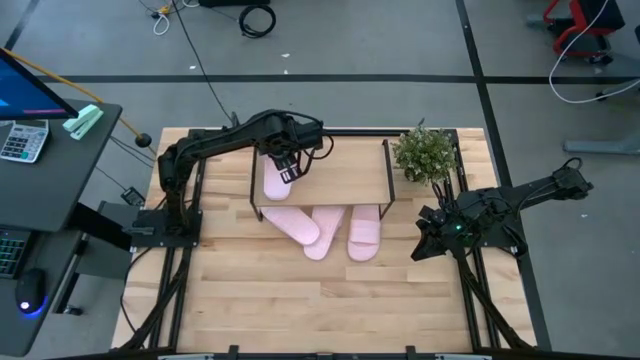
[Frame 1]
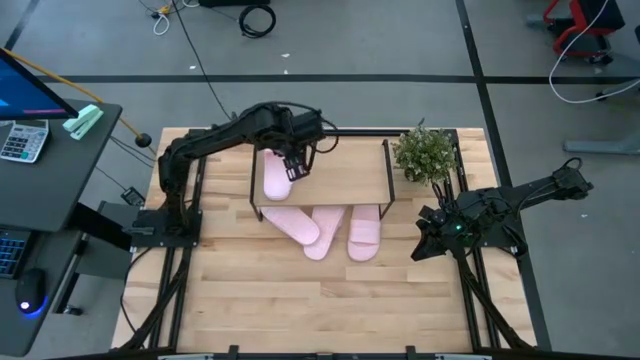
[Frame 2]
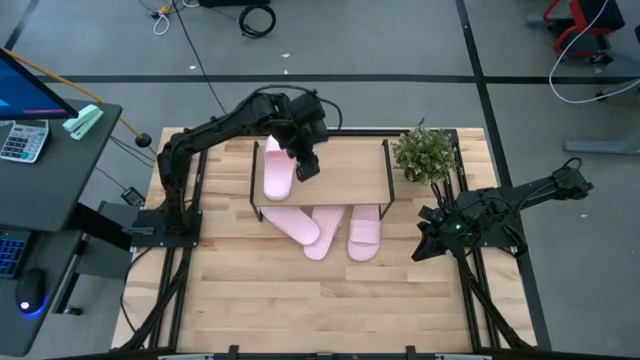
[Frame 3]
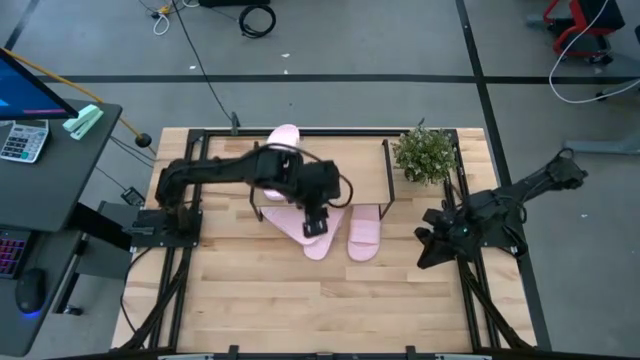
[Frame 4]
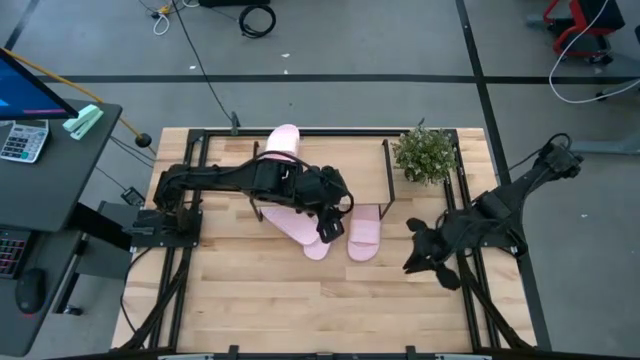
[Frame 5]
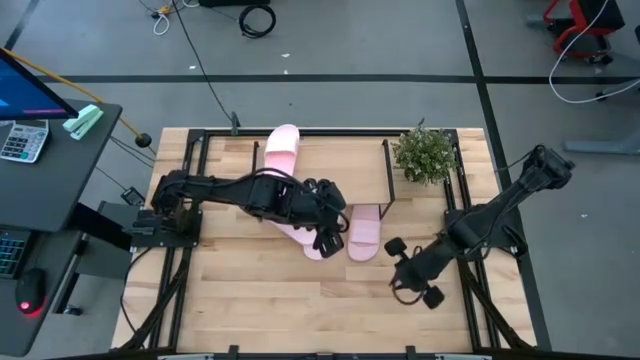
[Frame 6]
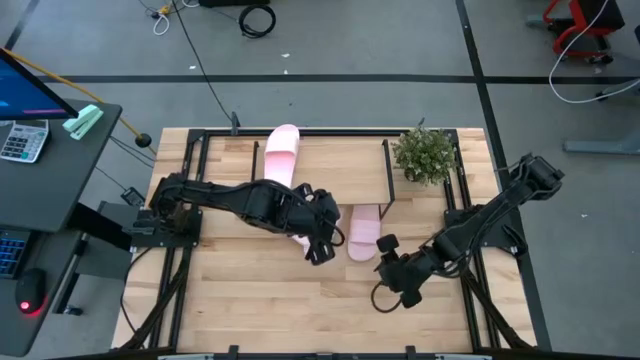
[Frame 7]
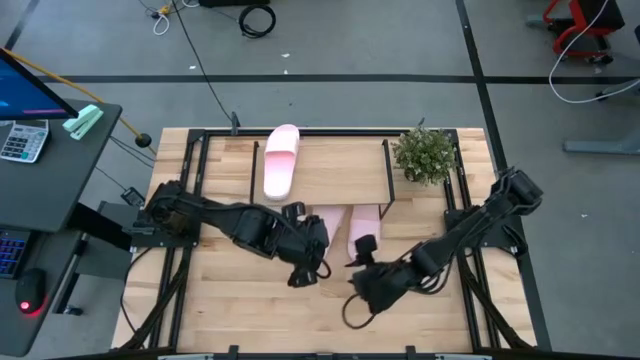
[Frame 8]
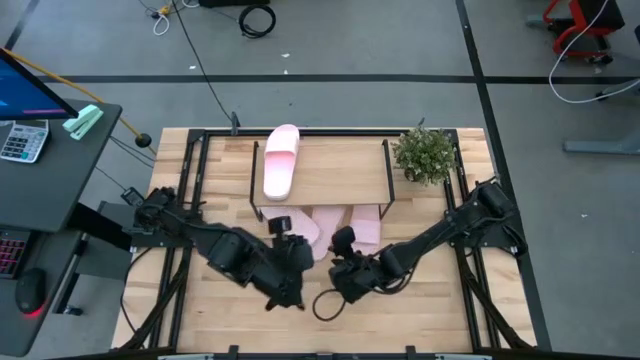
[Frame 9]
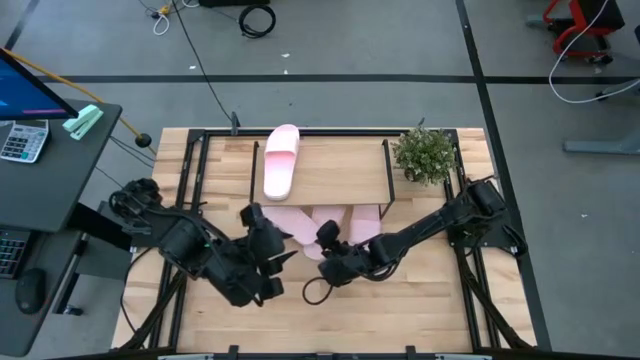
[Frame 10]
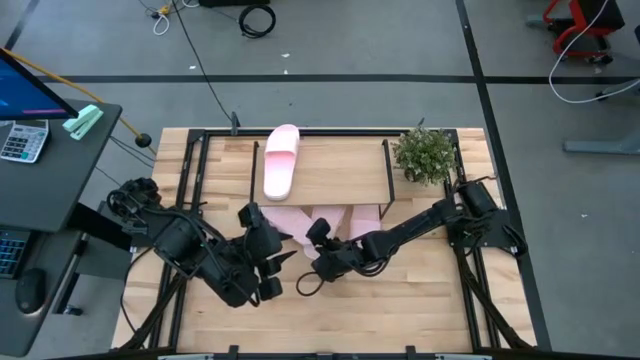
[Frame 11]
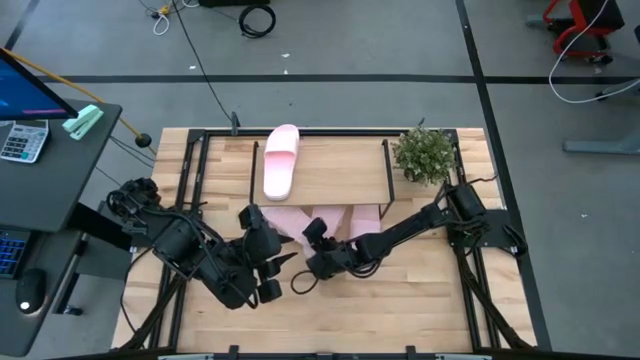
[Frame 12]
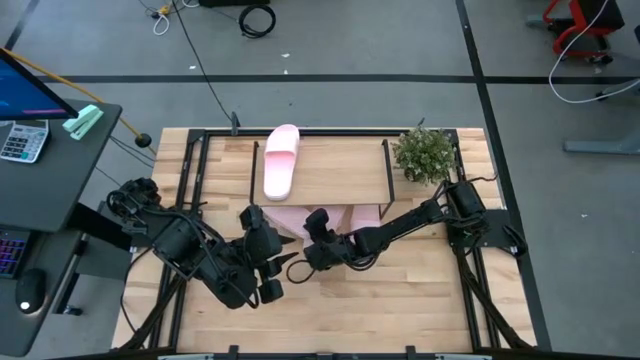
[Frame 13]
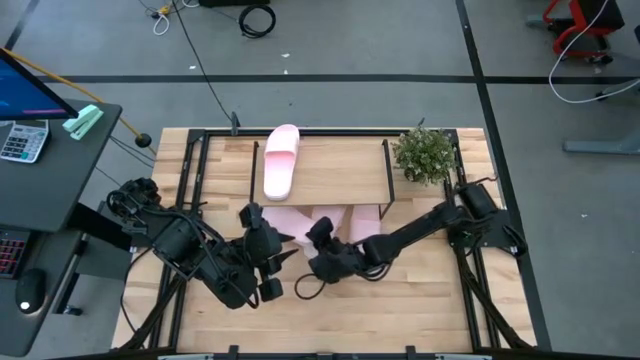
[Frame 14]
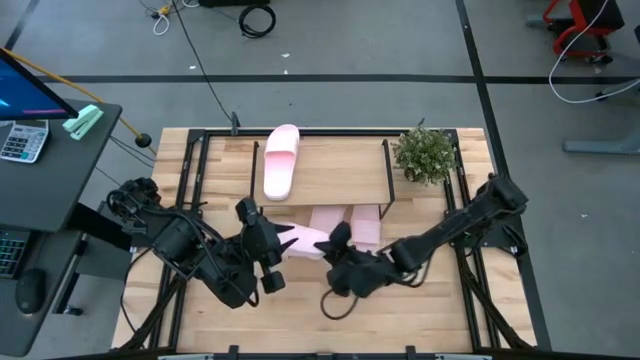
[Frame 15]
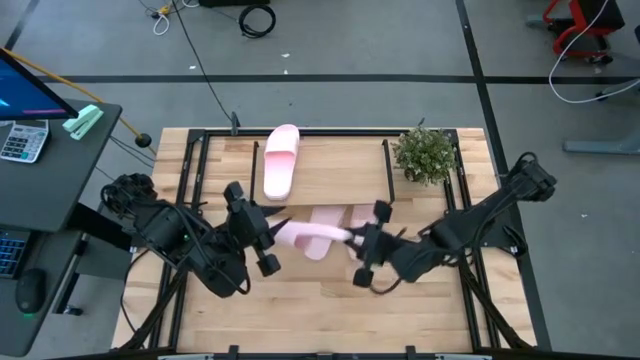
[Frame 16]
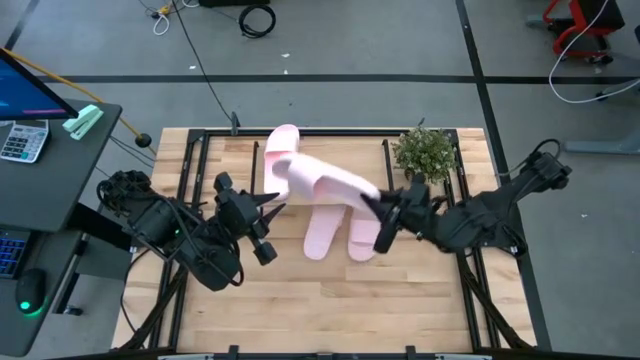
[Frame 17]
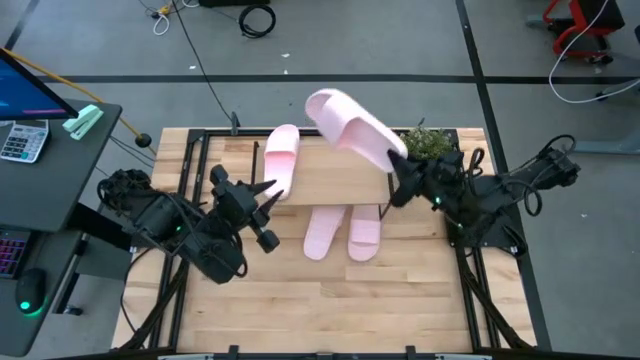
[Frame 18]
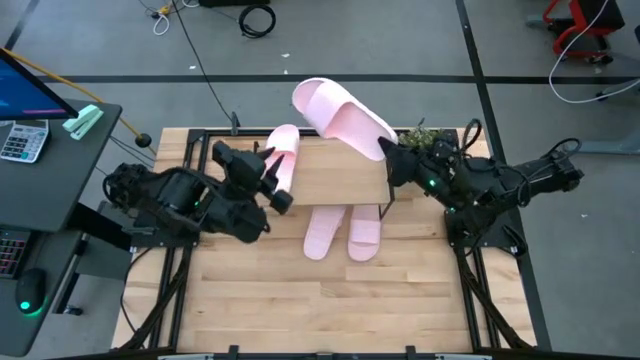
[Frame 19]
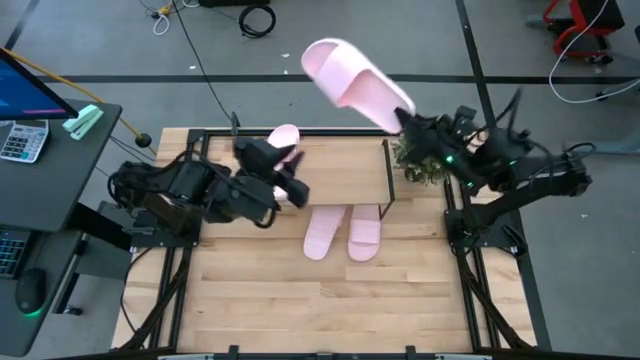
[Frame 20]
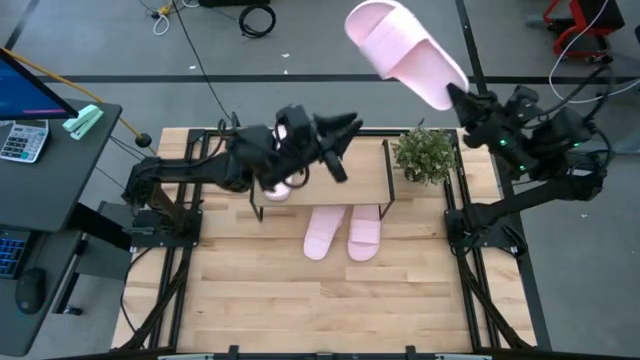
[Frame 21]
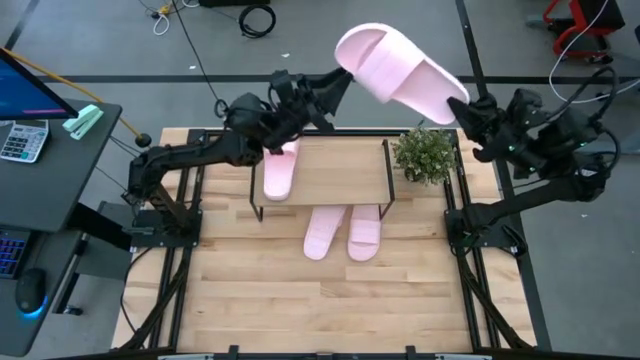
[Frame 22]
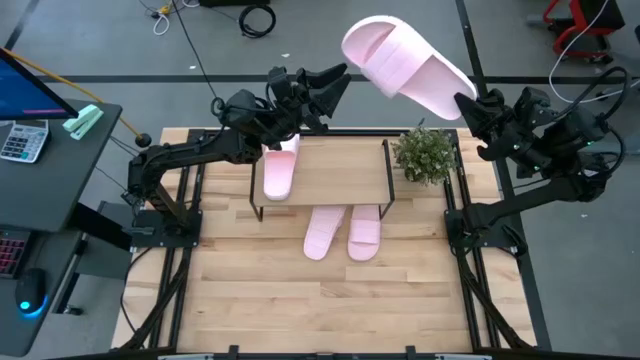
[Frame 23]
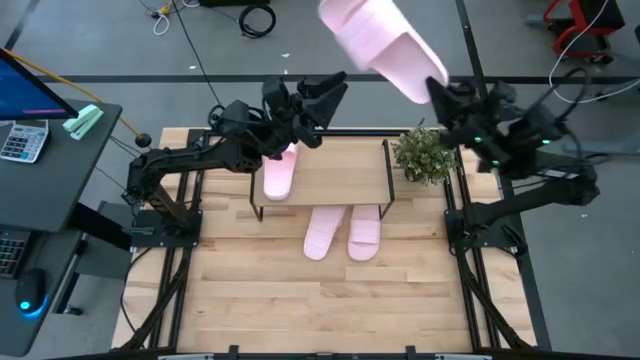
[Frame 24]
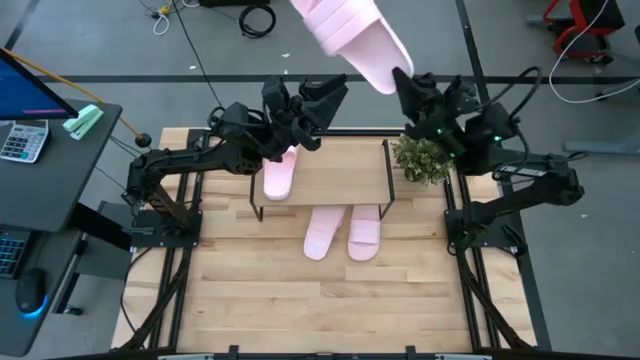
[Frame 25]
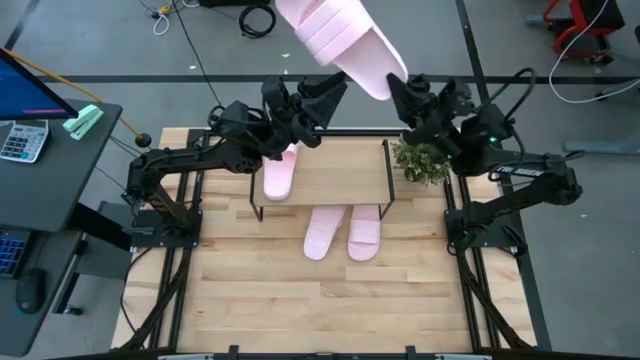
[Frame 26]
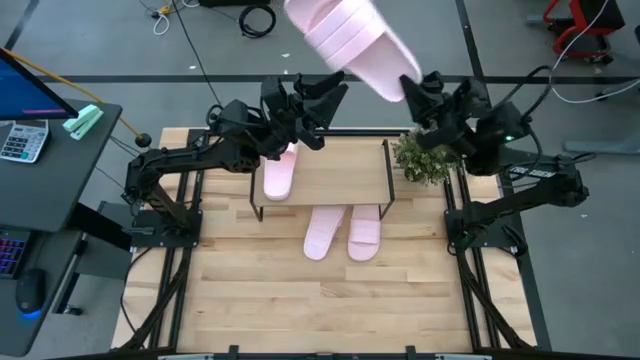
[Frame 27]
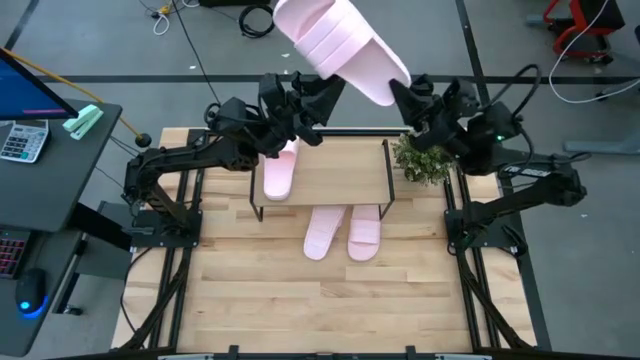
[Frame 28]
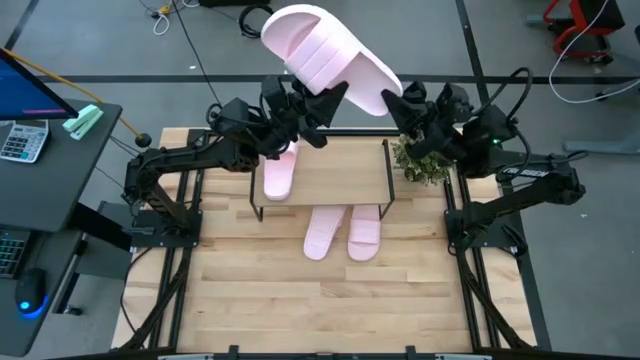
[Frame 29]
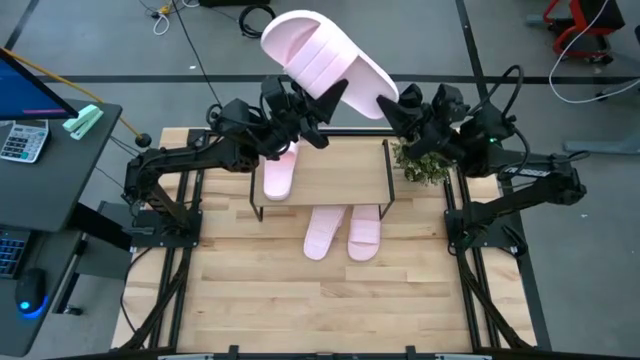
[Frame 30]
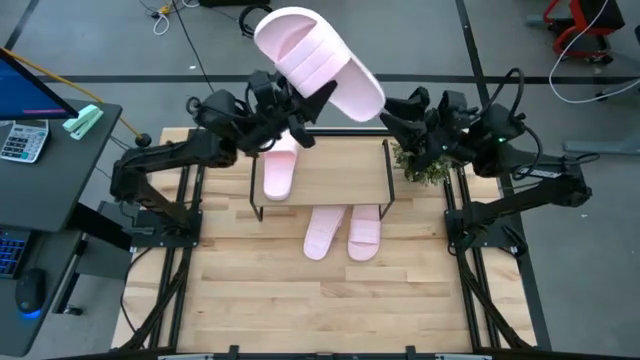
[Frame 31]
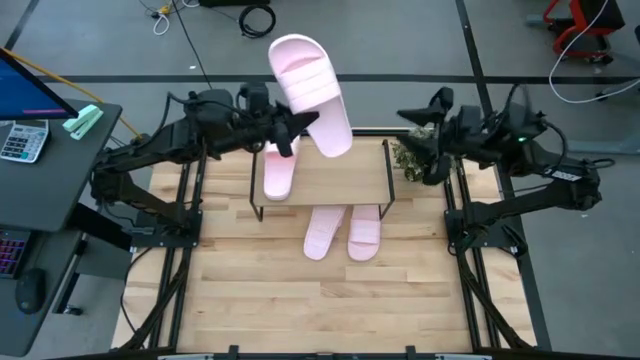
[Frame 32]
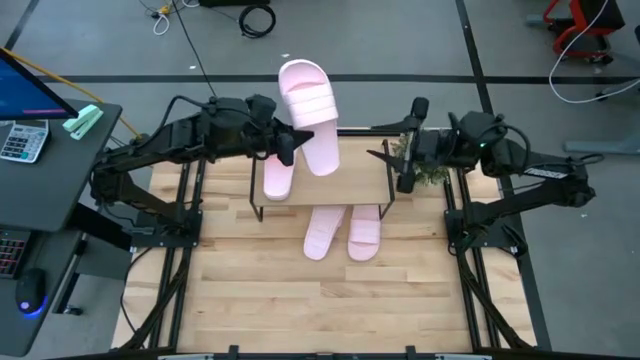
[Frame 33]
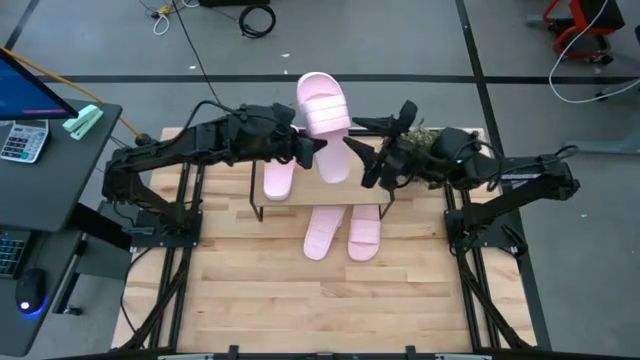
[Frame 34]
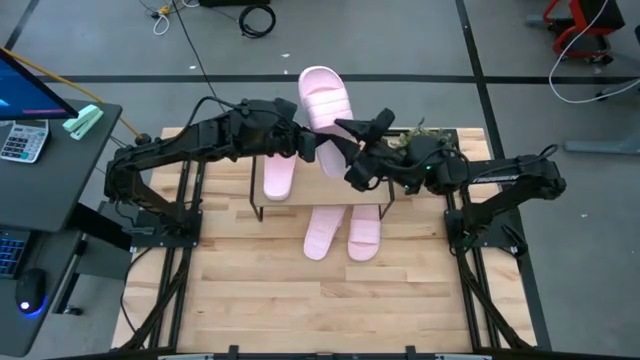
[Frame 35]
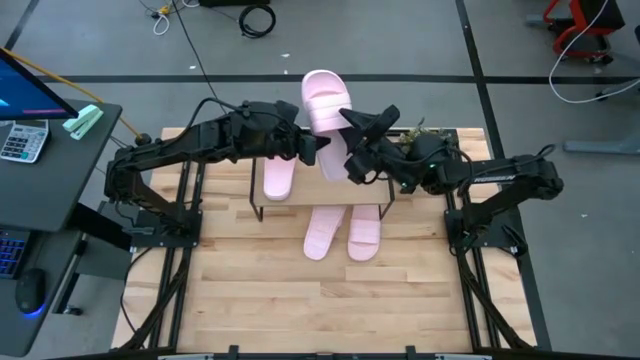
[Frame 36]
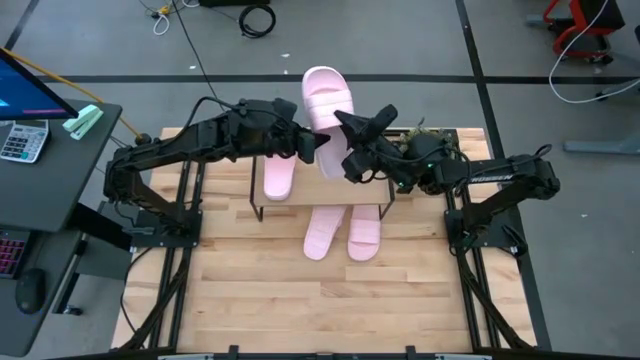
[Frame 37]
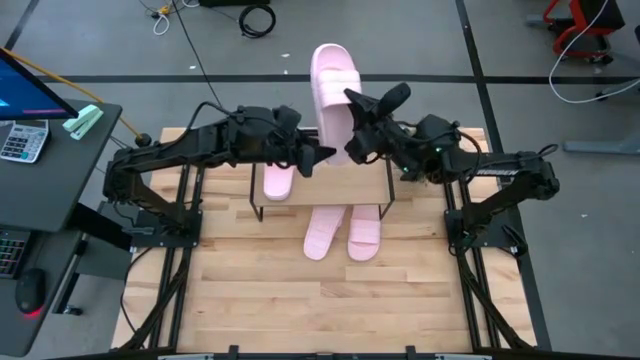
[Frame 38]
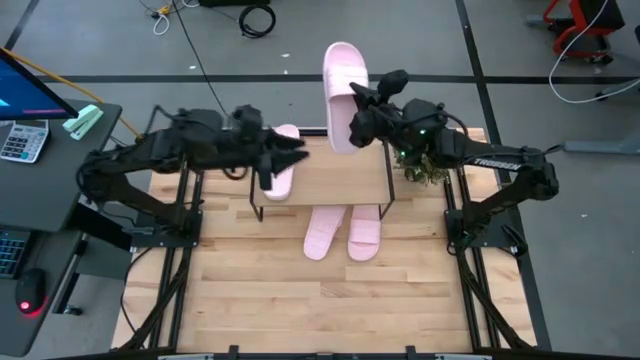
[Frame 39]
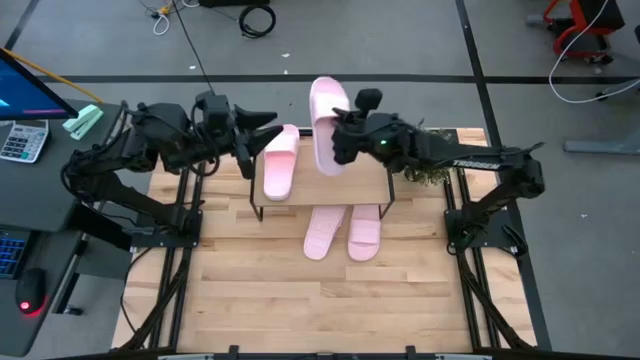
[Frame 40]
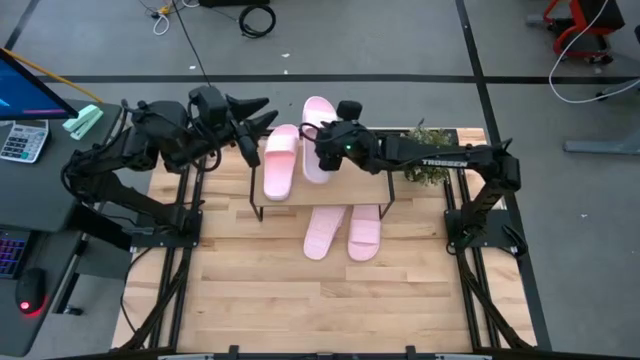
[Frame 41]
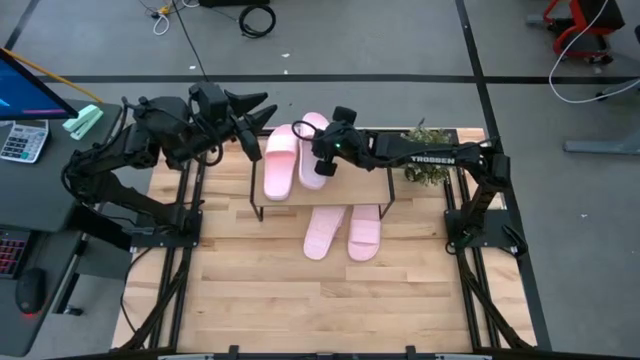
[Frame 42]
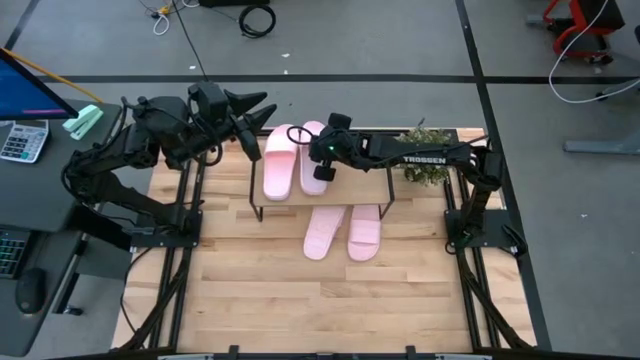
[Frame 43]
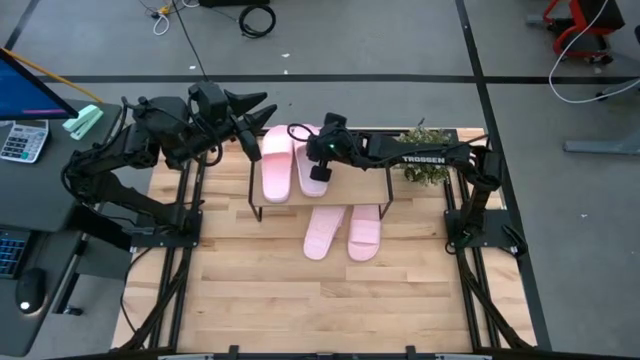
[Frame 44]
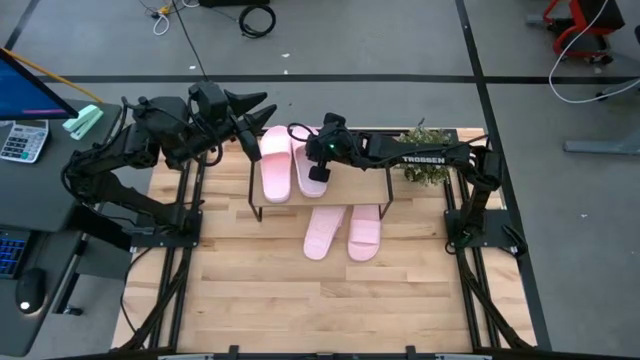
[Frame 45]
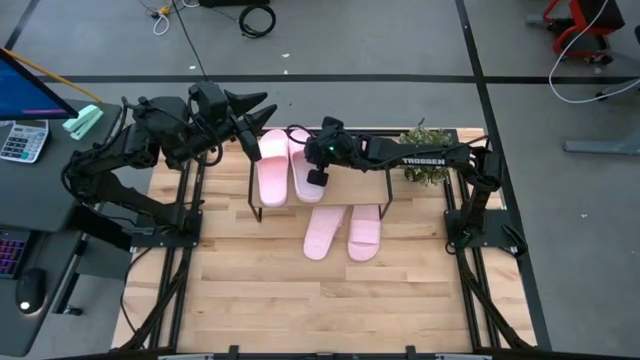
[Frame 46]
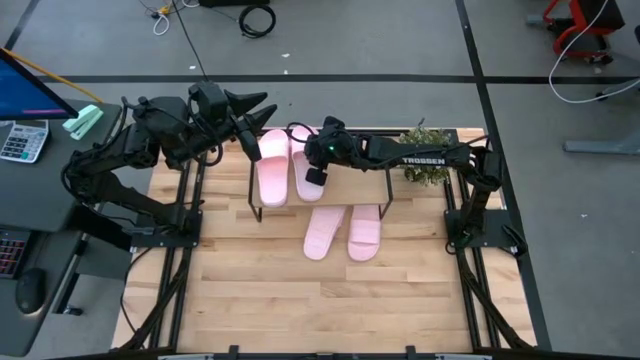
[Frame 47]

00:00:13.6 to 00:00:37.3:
Task: Pick and place slides into the shelf
Put the pink slipper on the shelf
